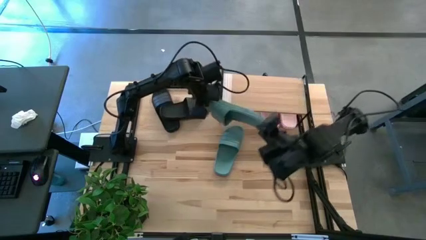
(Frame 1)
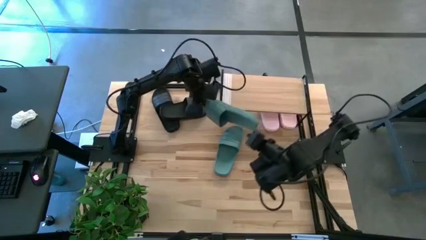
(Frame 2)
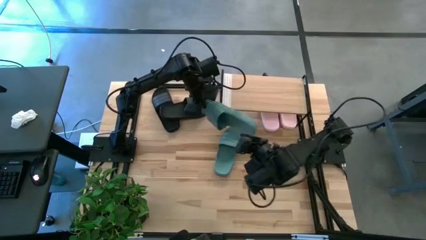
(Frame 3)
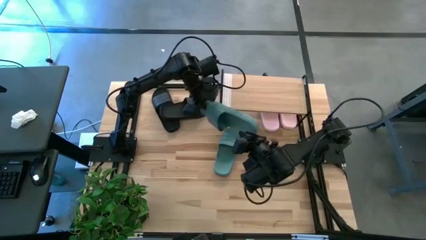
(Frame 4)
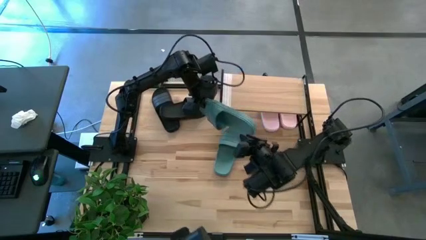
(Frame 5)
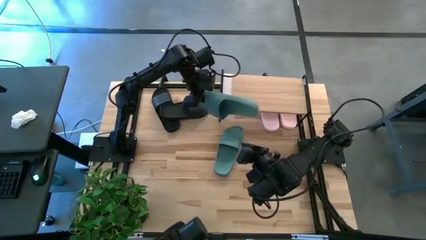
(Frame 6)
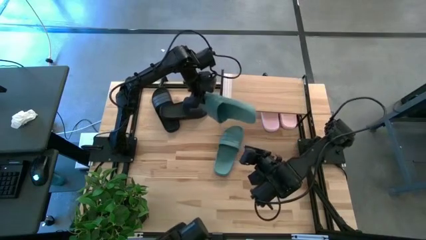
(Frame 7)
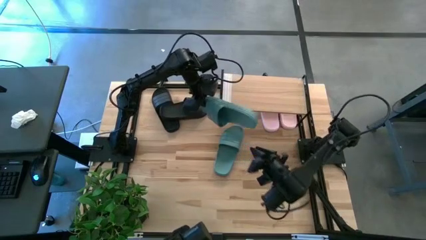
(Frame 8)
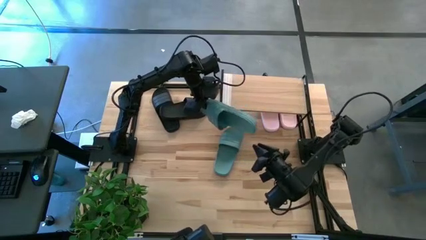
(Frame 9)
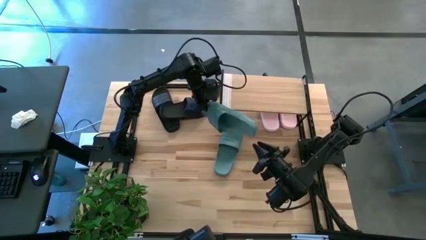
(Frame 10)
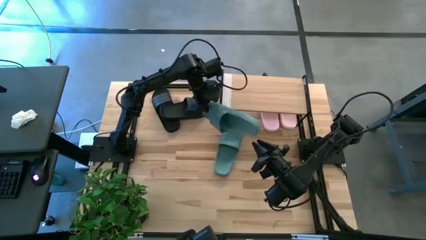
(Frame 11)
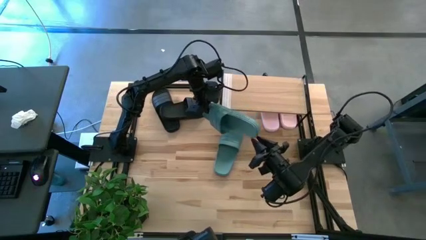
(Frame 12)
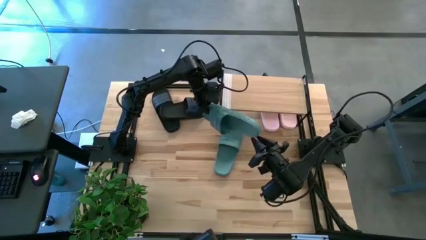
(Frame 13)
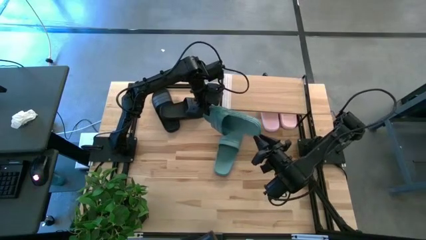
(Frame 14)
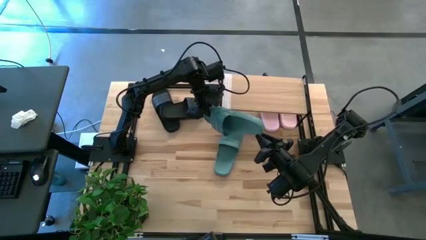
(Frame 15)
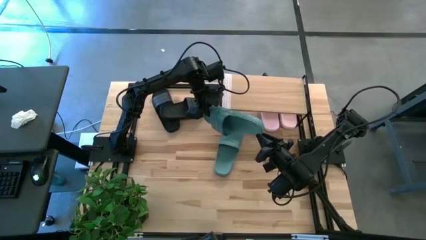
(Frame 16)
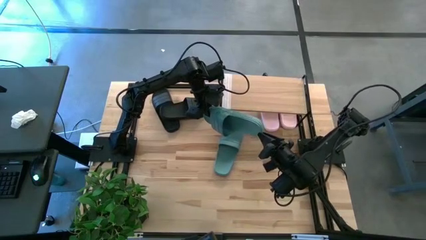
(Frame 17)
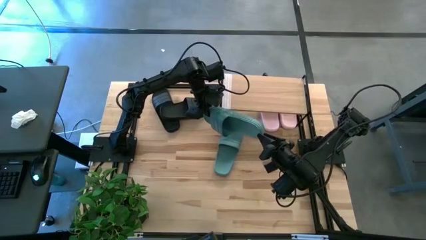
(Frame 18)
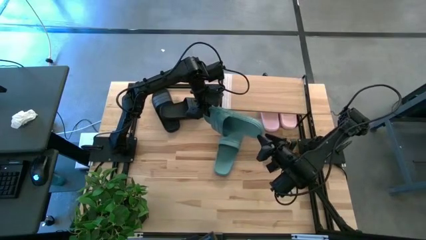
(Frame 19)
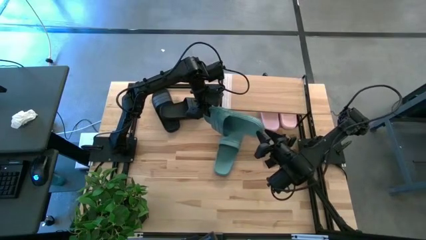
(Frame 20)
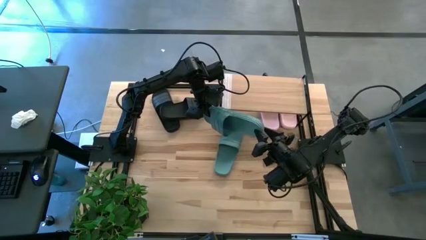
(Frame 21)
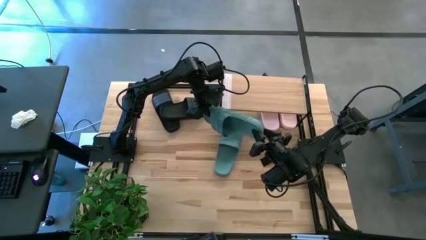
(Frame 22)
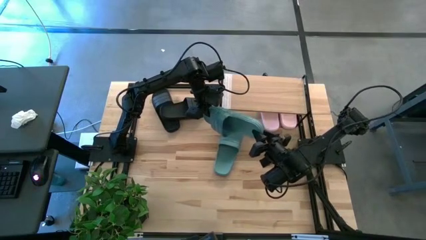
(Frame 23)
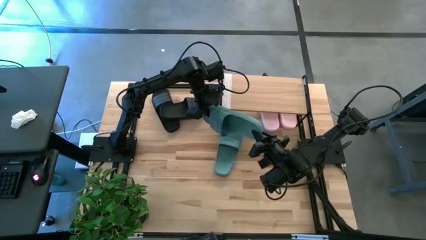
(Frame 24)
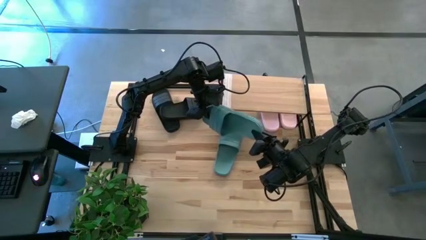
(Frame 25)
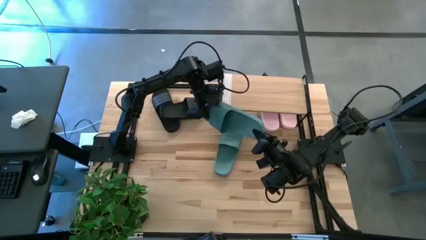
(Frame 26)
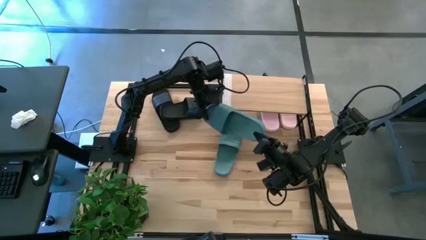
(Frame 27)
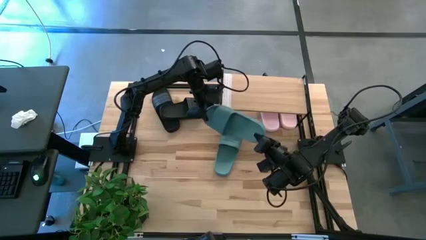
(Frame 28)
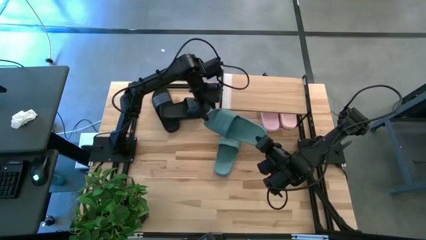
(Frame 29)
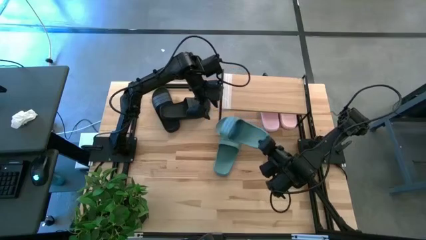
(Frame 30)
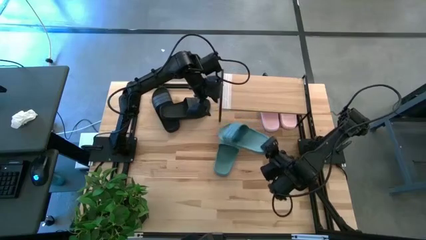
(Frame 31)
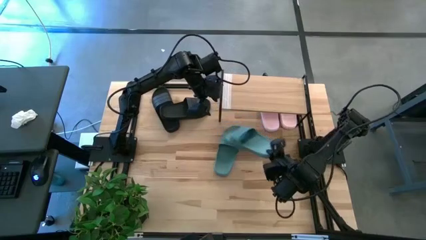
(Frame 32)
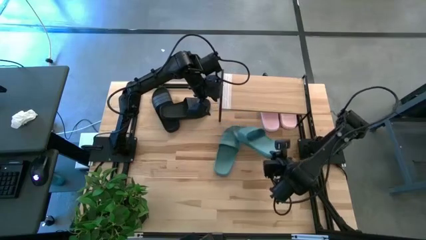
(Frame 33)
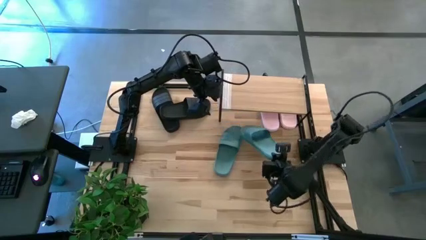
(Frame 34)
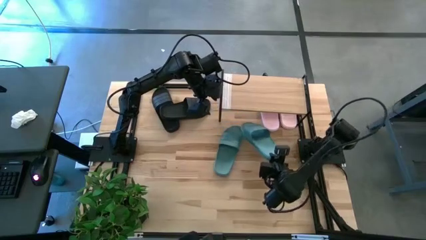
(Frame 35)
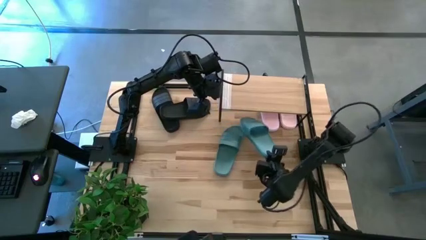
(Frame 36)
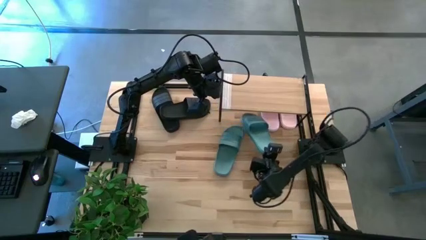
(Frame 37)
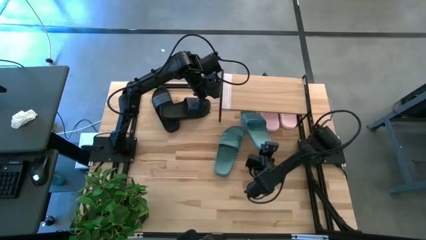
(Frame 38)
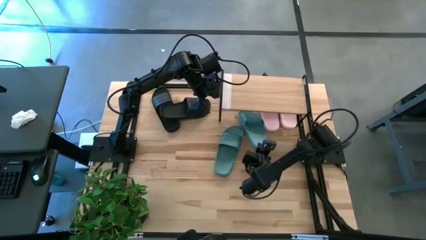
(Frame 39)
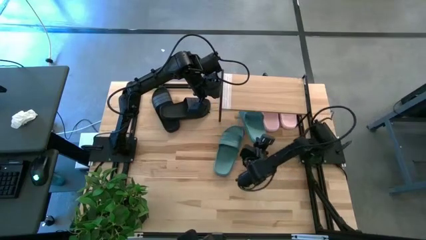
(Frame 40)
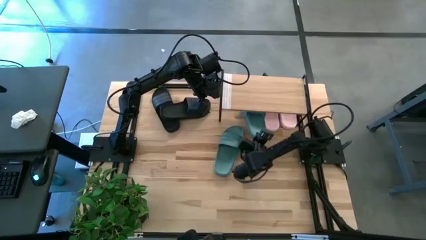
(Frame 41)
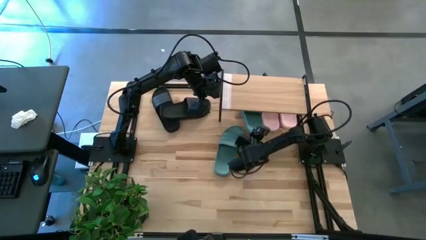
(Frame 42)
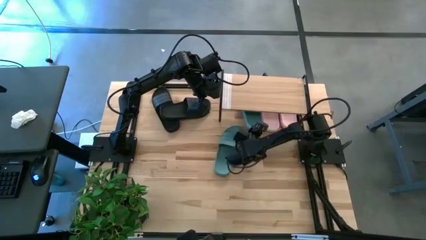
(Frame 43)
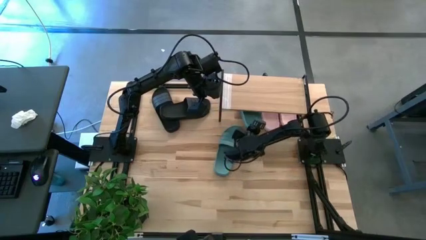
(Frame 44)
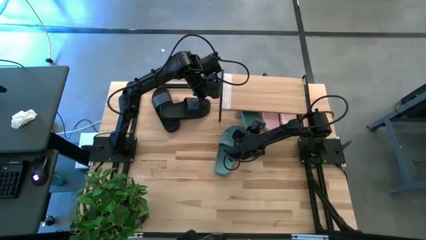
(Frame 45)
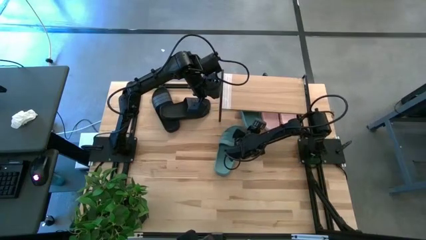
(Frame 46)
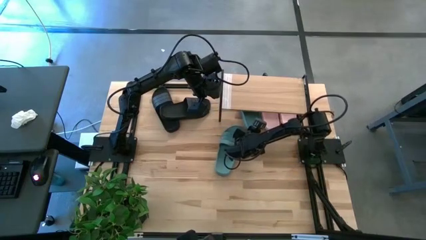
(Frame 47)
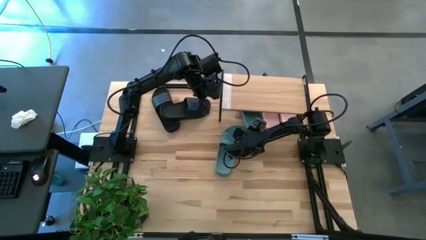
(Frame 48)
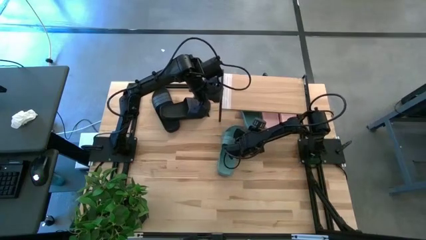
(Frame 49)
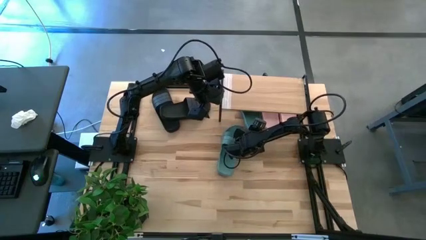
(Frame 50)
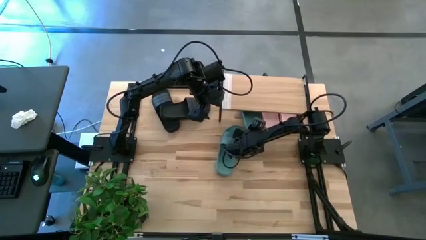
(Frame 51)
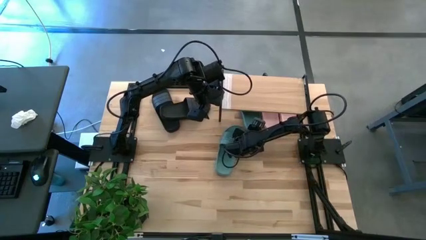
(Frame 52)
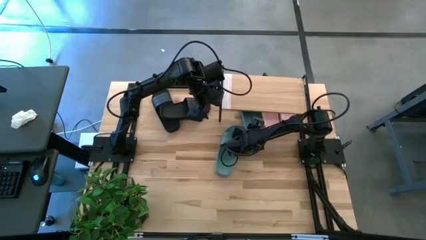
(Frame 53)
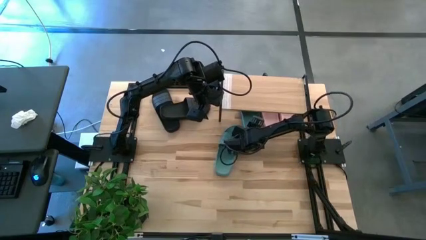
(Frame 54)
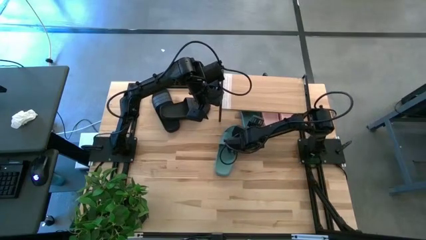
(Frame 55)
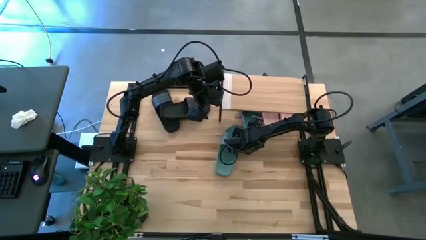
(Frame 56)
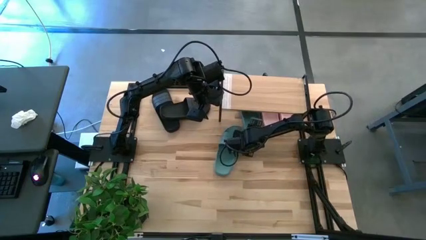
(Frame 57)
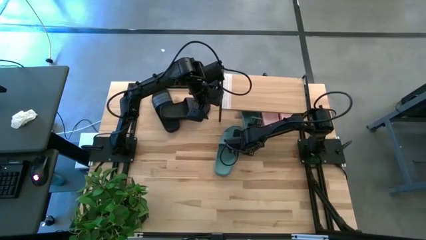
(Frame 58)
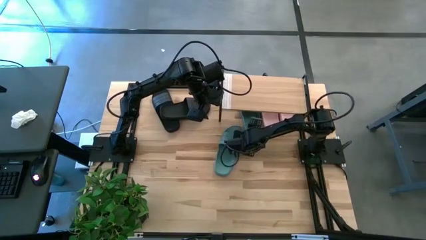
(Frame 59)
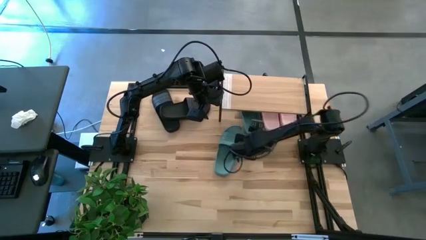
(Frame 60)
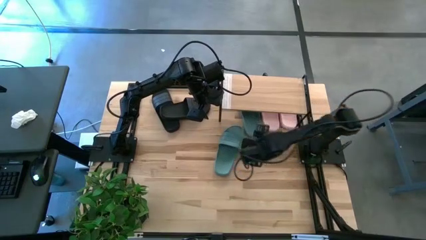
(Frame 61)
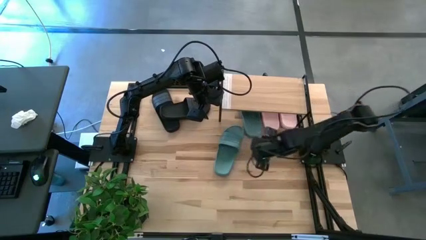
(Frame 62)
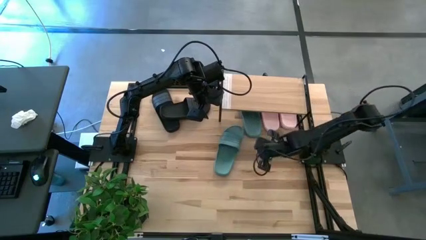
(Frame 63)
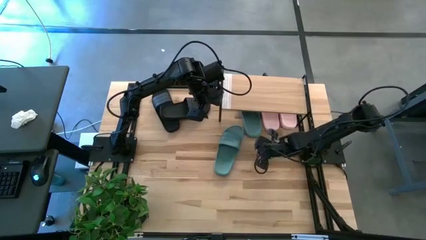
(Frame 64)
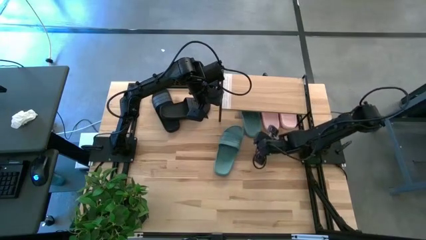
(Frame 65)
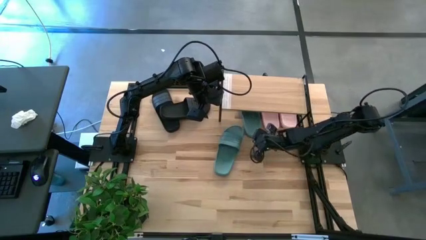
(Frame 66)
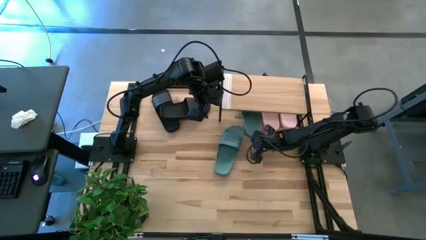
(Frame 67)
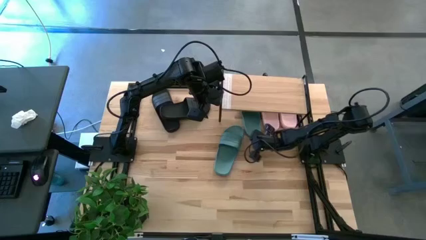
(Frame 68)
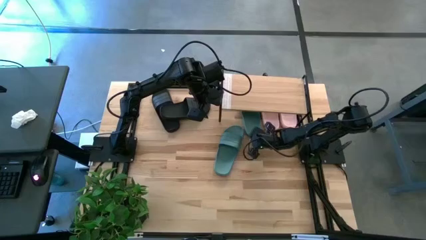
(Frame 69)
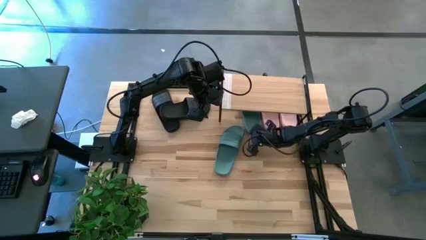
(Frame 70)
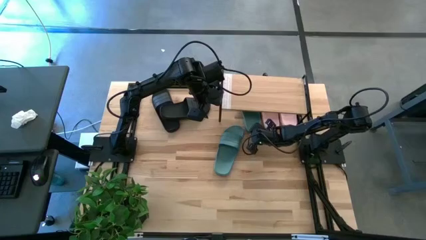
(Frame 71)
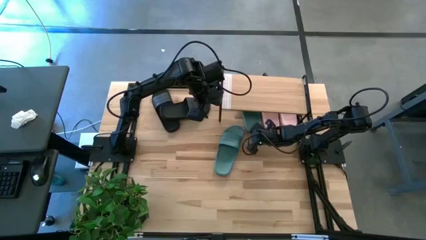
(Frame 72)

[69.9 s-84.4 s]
Task: Pick and place slides into the shelf
Put the left green slides under the shelf
